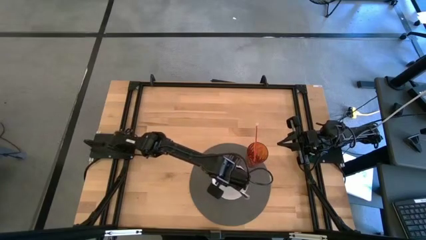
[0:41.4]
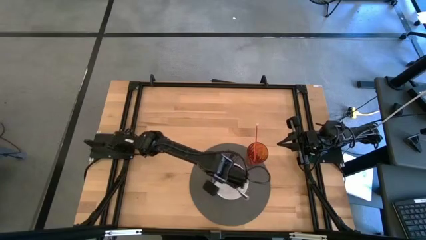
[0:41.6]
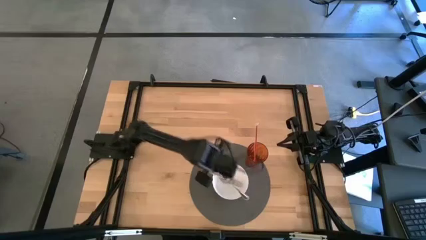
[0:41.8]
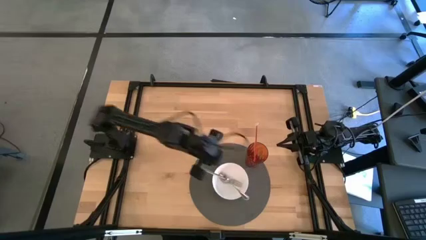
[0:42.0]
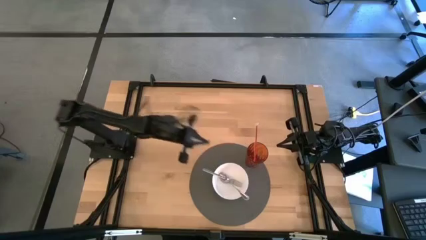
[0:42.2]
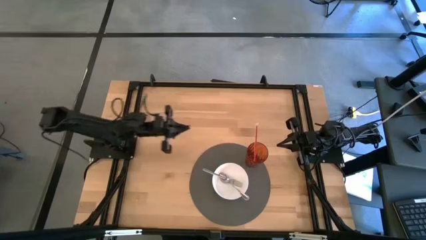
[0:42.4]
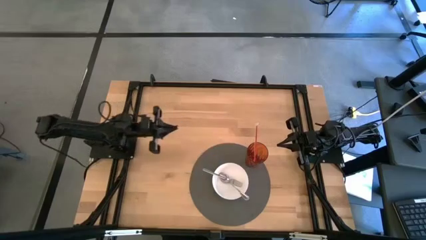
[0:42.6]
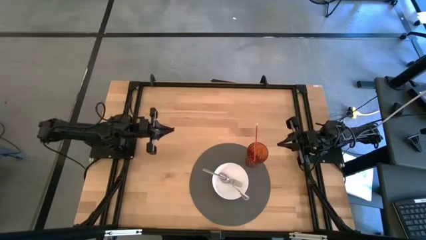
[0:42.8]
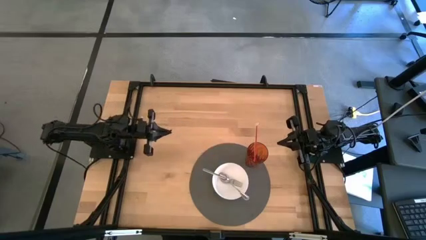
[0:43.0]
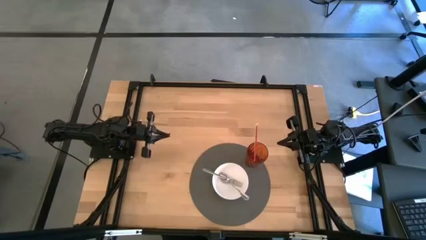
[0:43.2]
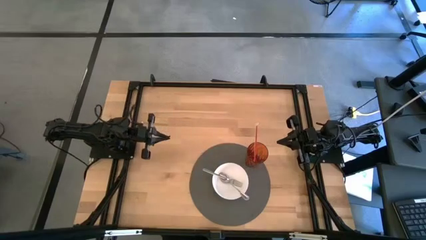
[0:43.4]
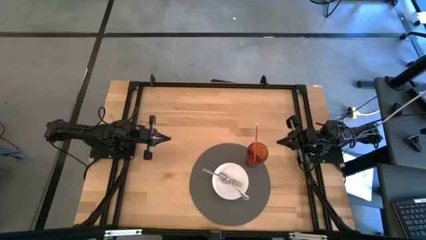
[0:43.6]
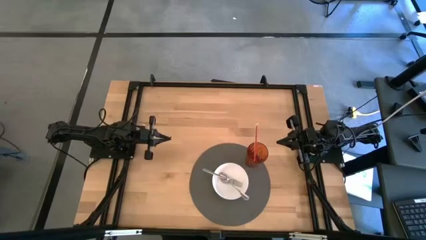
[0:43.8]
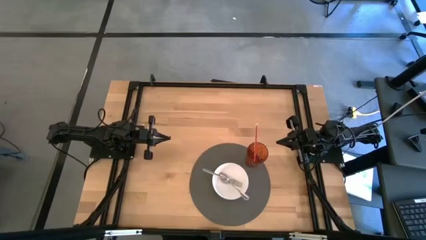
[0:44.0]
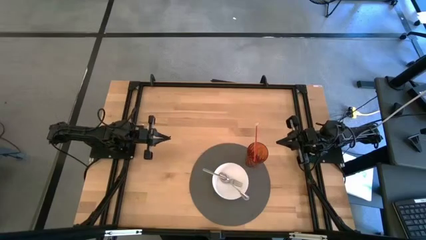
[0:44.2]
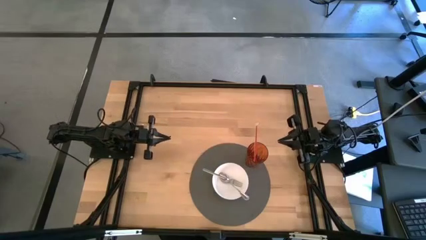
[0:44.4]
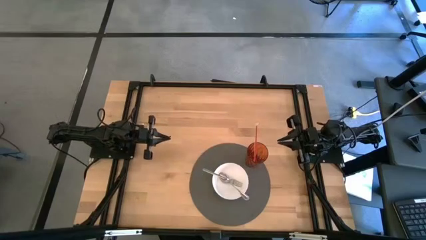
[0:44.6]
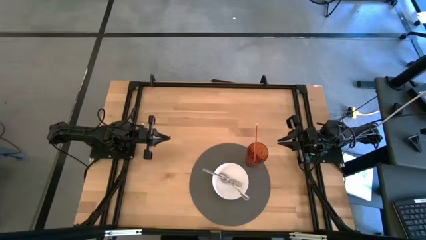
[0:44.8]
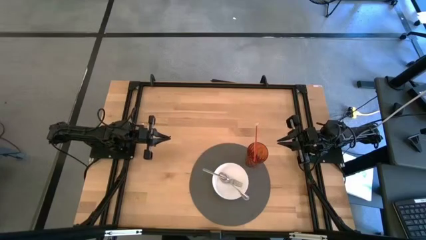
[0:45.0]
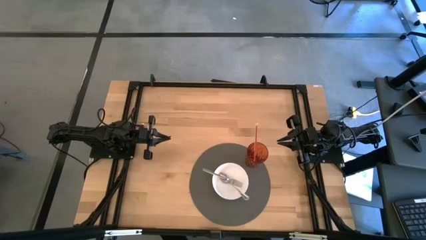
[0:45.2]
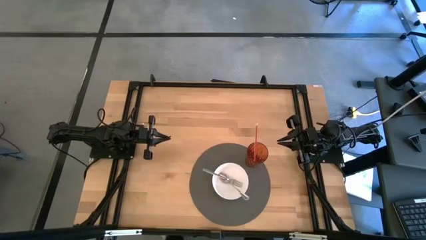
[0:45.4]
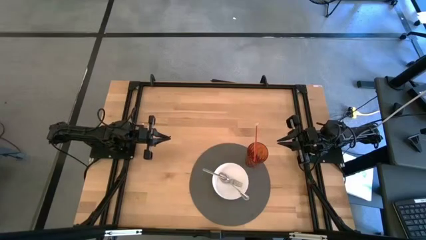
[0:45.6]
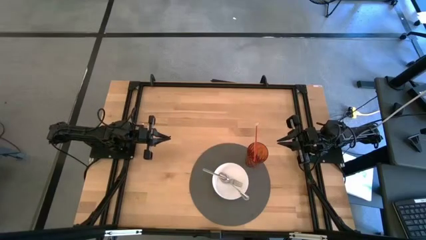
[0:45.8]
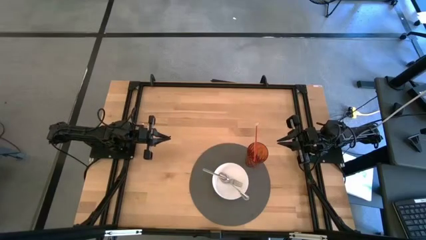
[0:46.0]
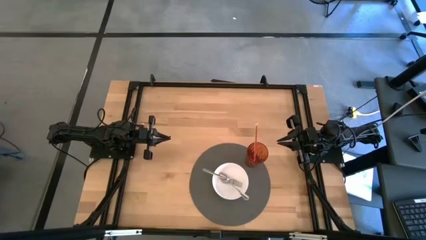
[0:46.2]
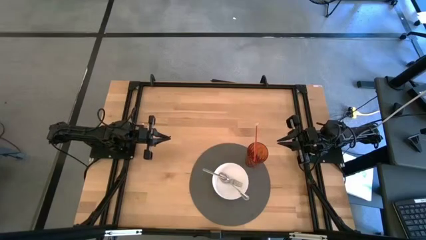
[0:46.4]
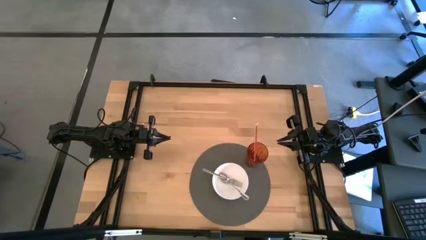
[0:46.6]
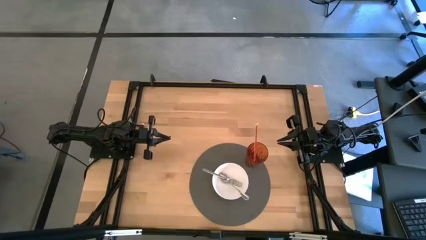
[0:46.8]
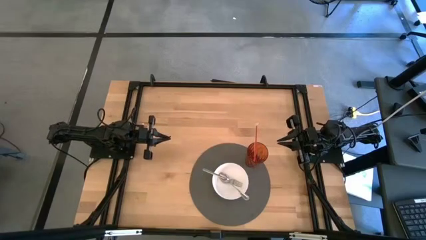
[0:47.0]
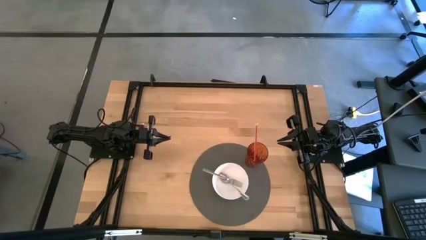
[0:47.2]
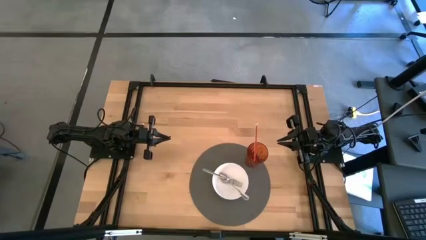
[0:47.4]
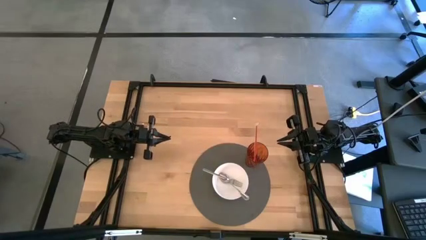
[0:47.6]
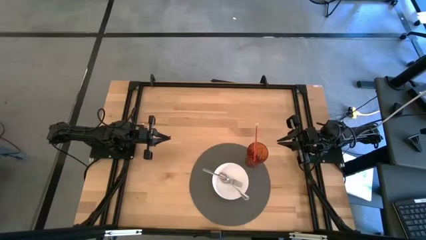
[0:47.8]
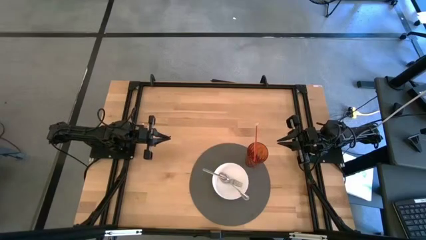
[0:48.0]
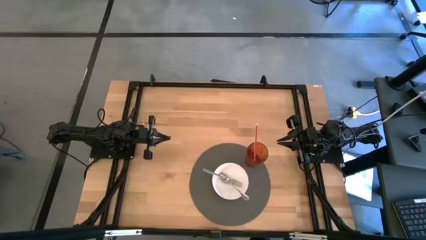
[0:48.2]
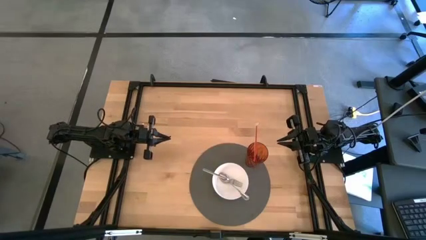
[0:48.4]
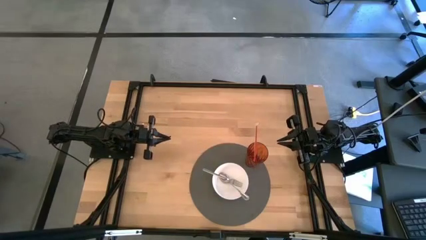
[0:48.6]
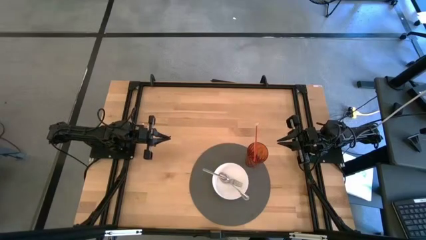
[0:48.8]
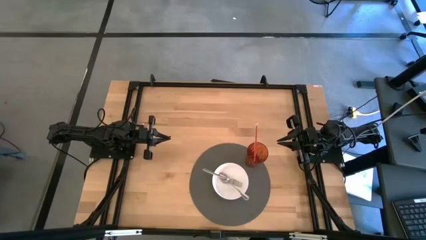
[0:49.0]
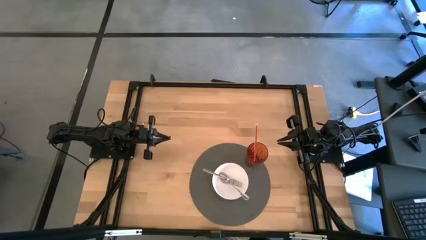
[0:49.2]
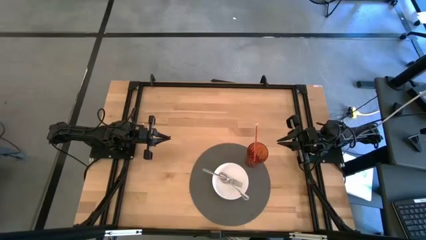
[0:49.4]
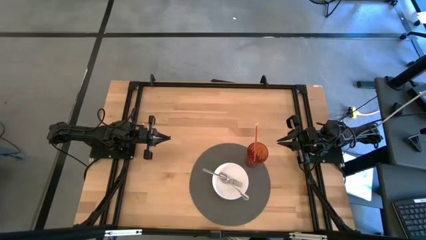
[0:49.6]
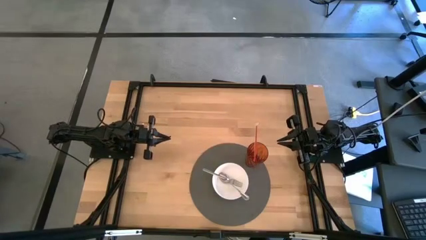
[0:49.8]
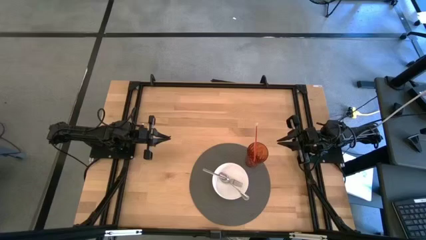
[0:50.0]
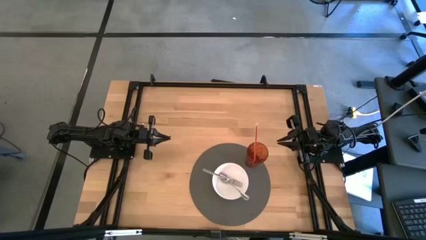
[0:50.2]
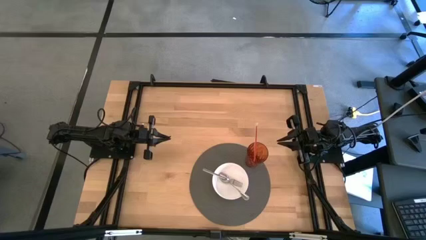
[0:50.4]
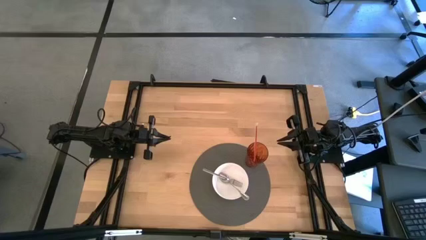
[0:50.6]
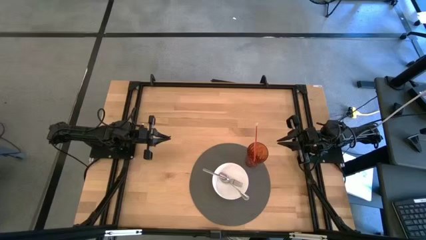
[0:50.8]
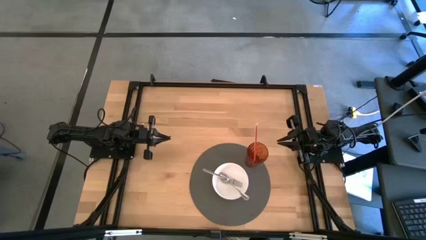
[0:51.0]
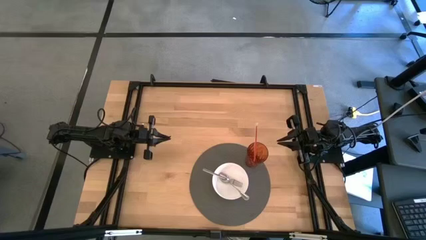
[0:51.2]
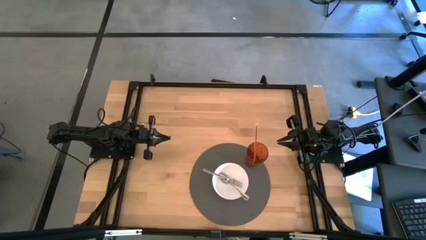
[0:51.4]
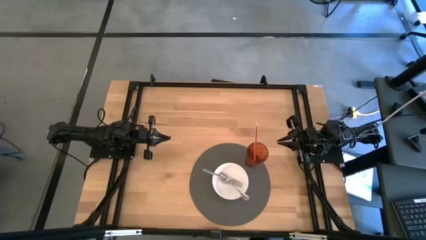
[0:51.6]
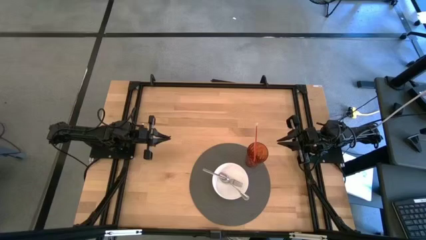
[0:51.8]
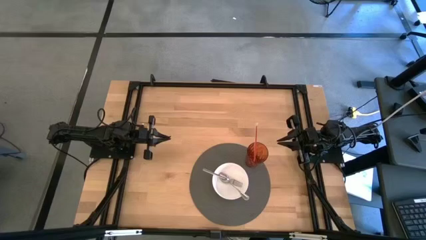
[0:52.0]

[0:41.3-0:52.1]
Task: Pick & Place Utensil
Return to Home Position

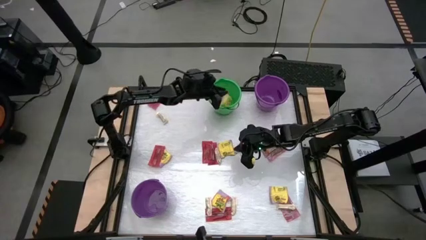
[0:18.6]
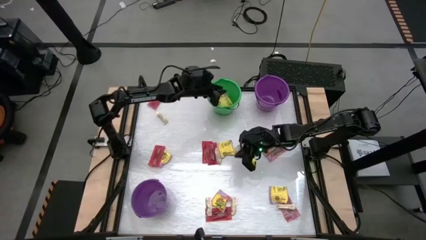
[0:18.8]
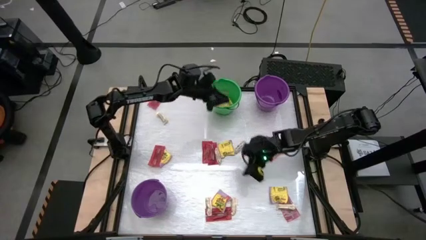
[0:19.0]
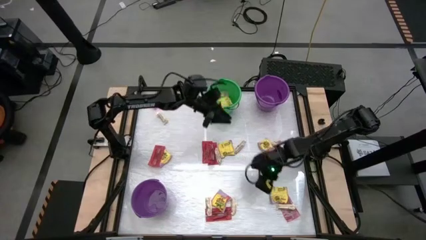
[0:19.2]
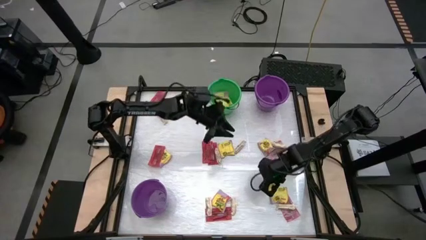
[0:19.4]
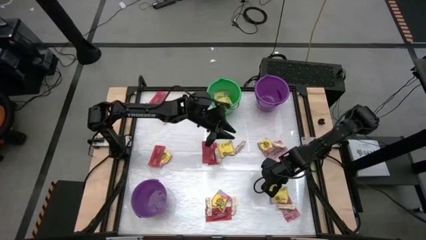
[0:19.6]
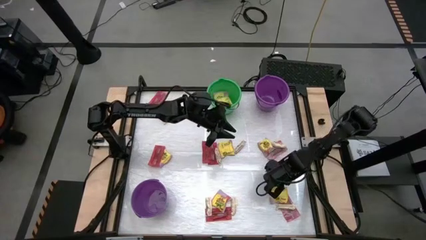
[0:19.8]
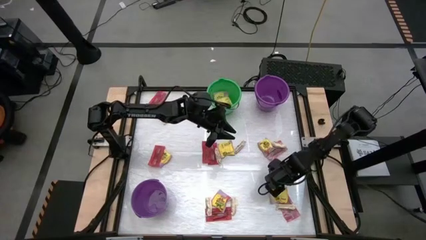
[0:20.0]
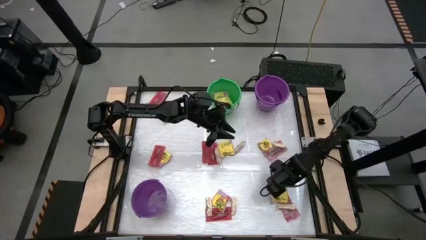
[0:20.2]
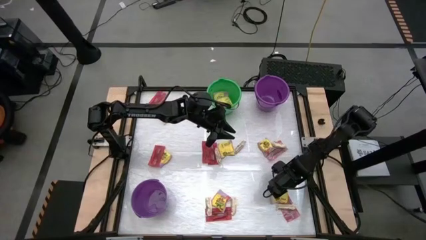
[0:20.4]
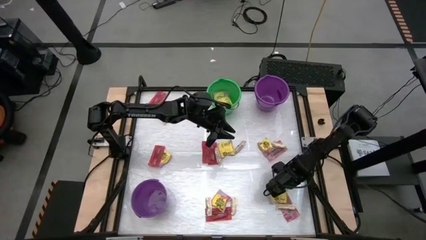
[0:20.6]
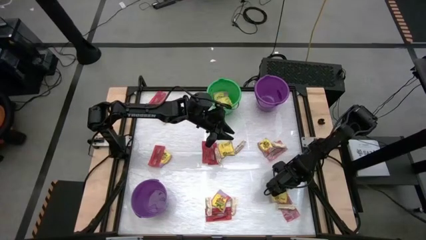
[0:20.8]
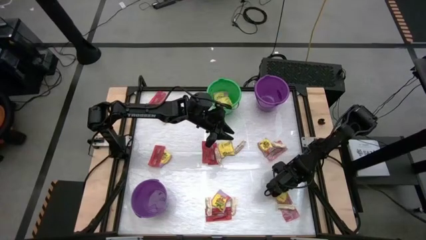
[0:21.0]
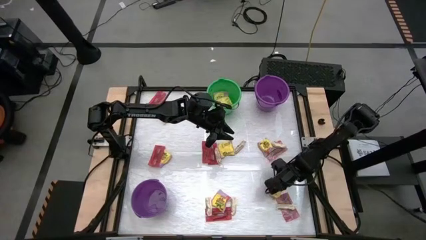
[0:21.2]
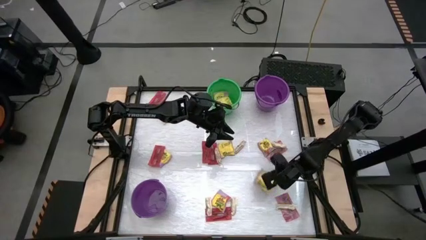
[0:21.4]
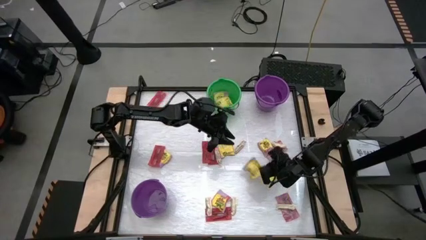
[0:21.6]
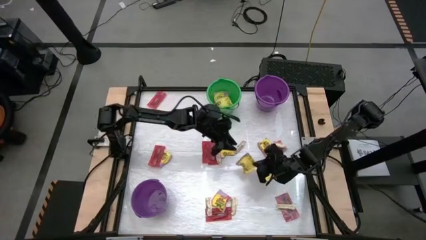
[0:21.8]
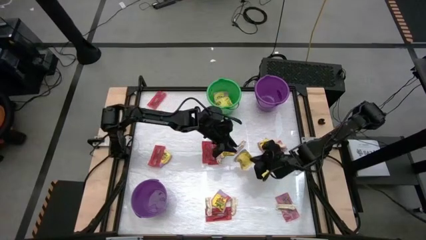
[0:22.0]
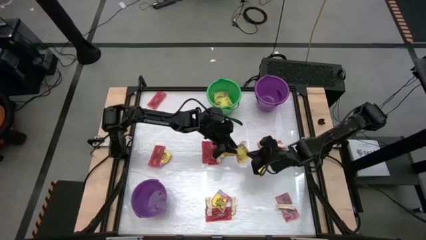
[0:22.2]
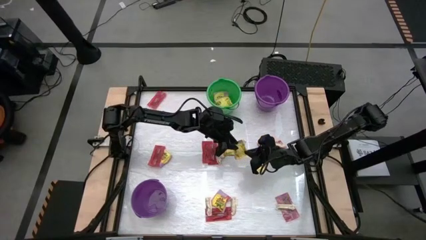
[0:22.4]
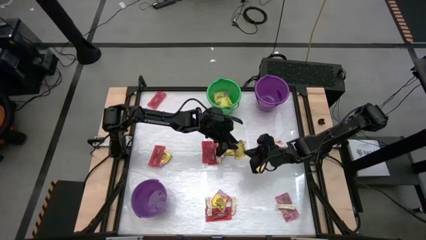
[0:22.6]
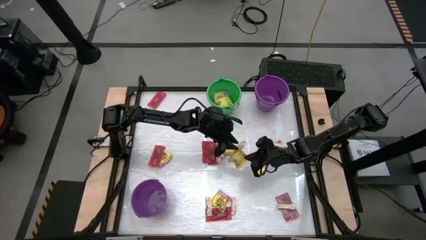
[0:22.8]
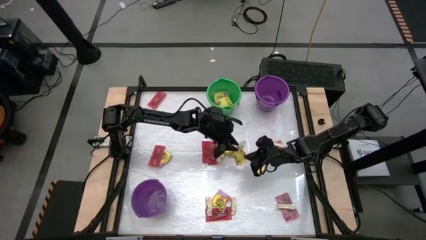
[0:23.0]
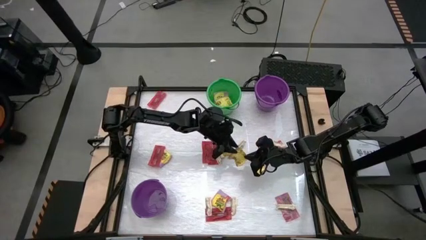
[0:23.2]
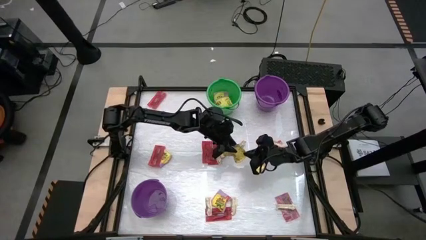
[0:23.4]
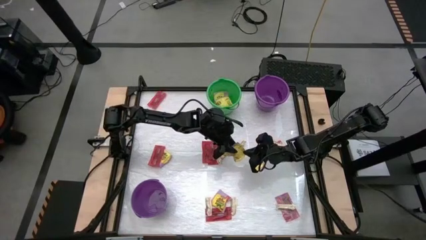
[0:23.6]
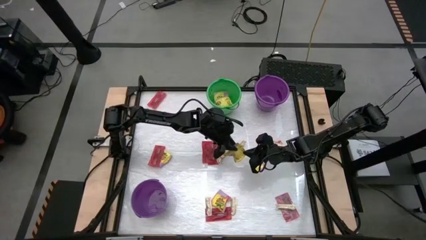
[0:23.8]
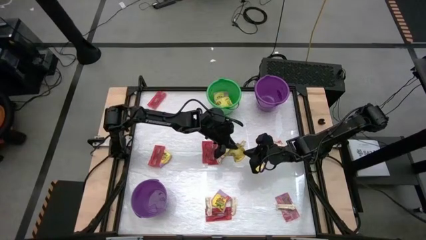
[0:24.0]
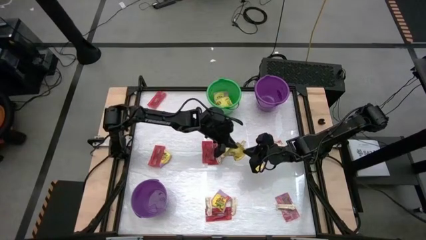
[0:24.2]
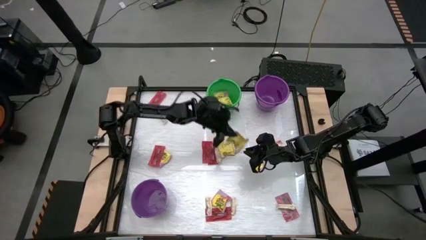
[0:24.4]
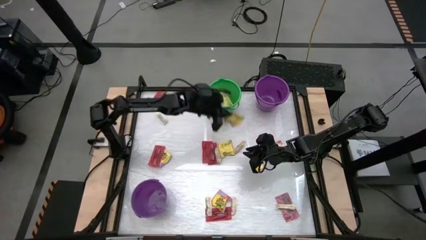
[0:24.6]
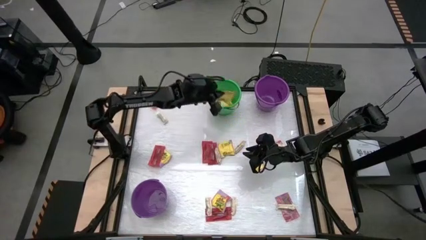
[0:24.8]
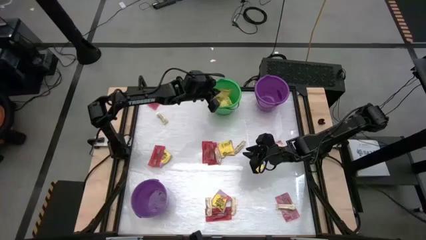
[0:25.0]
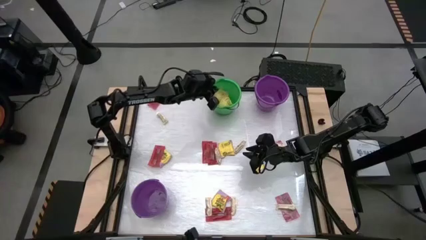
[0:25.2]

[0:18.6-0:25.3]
Task: Sort candy by brand, put in halloween buckets
Put the yellow candy into the green bucket
